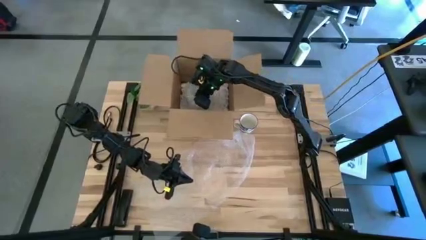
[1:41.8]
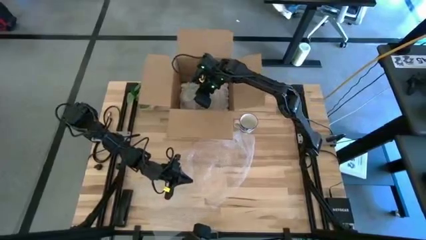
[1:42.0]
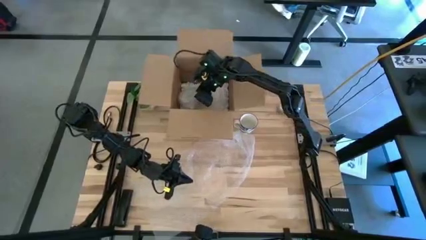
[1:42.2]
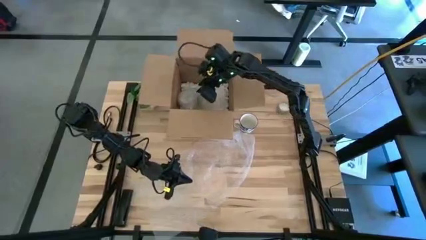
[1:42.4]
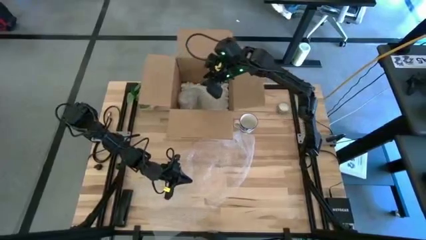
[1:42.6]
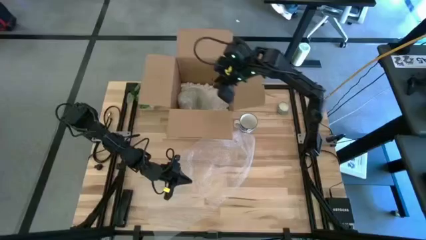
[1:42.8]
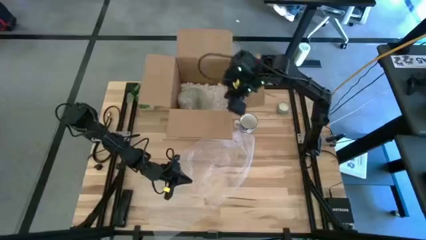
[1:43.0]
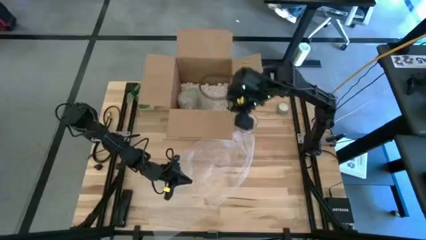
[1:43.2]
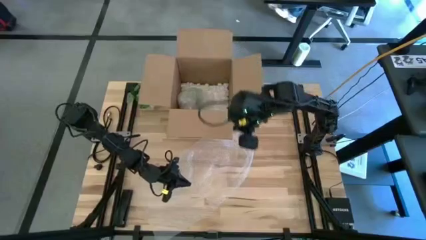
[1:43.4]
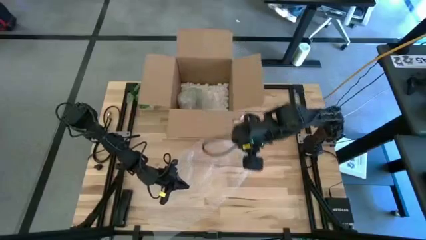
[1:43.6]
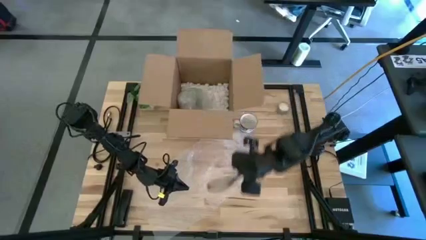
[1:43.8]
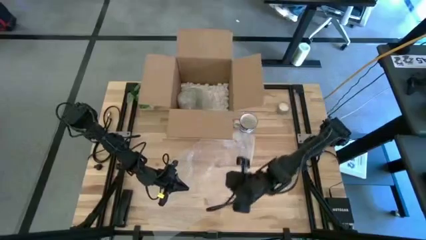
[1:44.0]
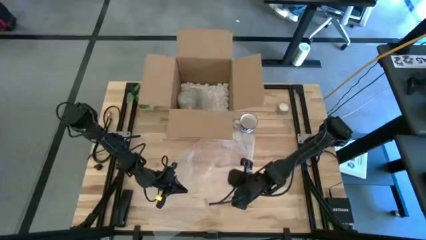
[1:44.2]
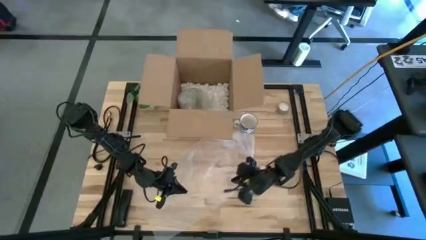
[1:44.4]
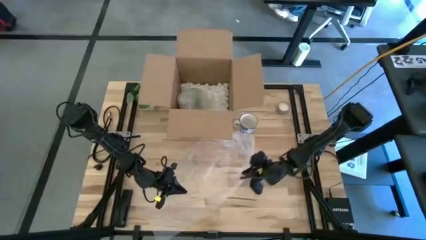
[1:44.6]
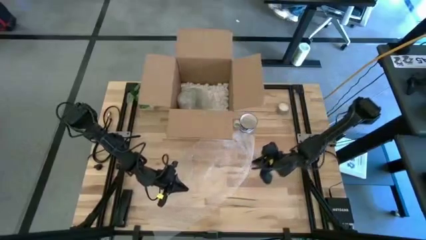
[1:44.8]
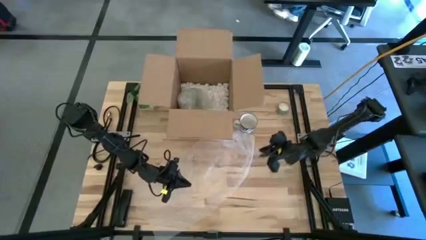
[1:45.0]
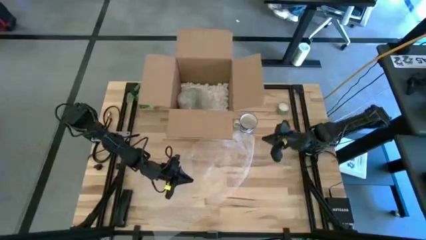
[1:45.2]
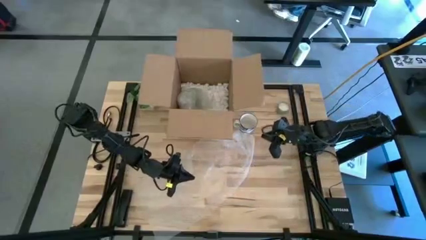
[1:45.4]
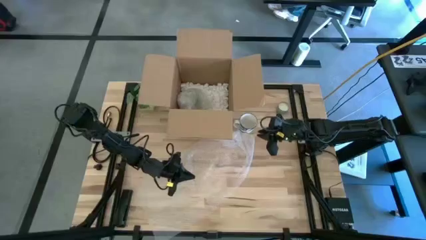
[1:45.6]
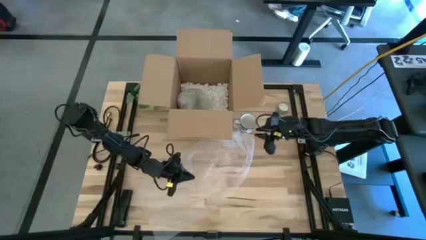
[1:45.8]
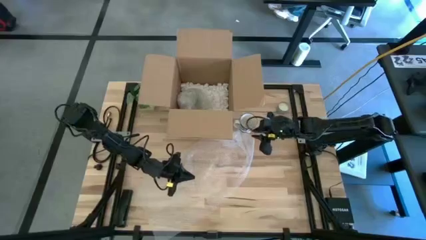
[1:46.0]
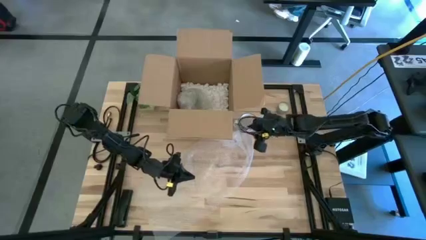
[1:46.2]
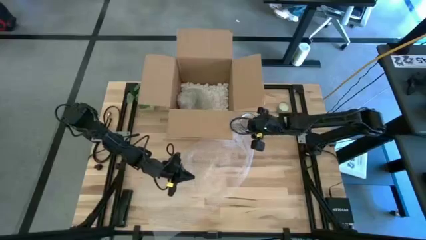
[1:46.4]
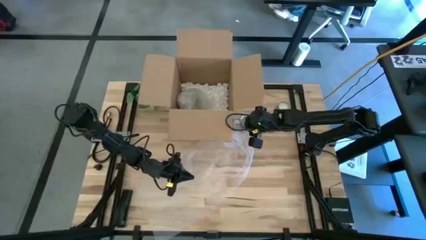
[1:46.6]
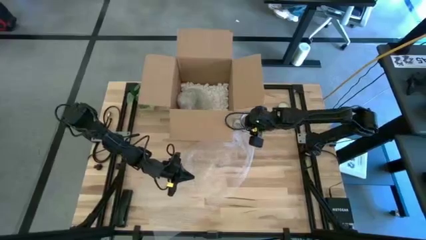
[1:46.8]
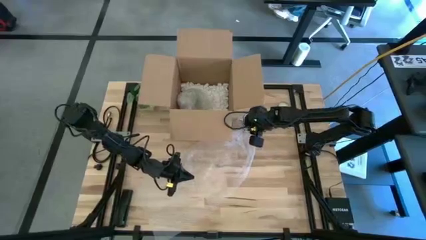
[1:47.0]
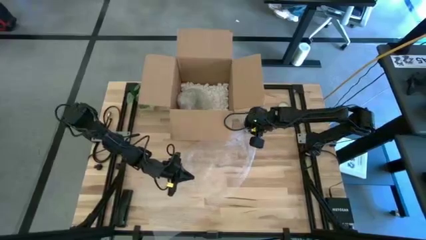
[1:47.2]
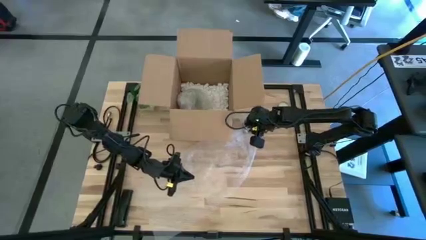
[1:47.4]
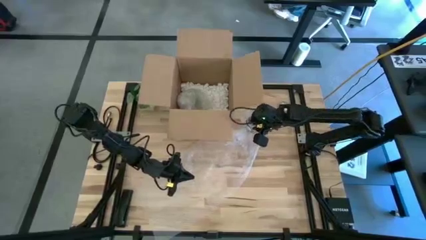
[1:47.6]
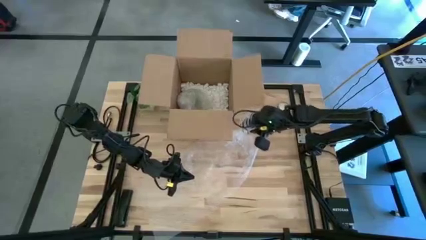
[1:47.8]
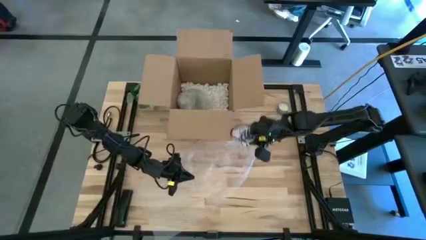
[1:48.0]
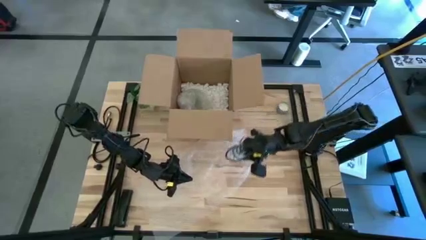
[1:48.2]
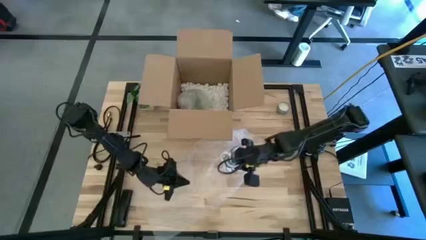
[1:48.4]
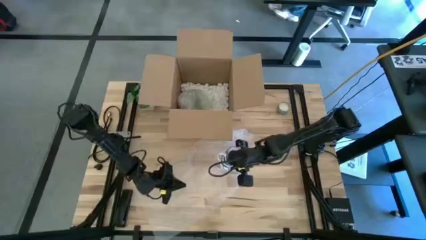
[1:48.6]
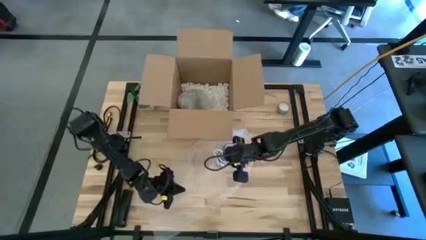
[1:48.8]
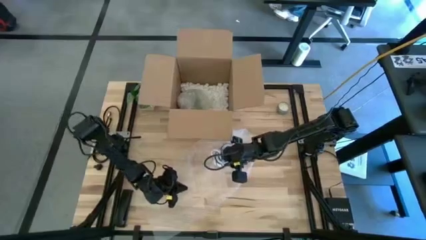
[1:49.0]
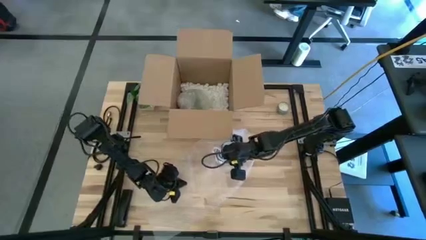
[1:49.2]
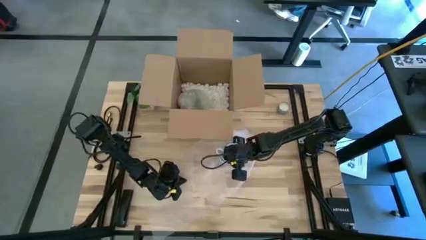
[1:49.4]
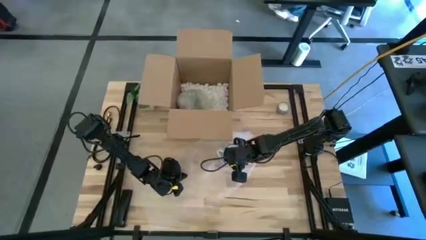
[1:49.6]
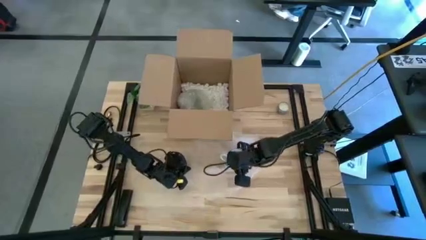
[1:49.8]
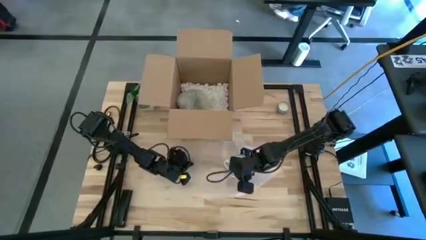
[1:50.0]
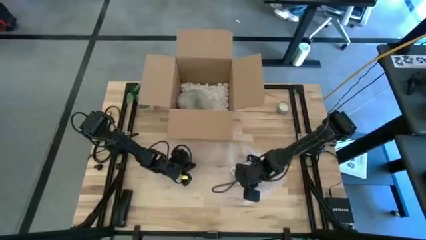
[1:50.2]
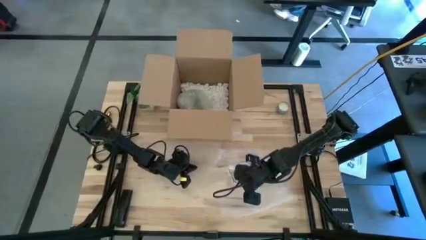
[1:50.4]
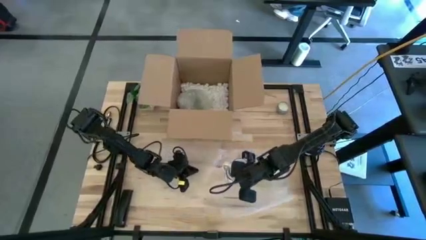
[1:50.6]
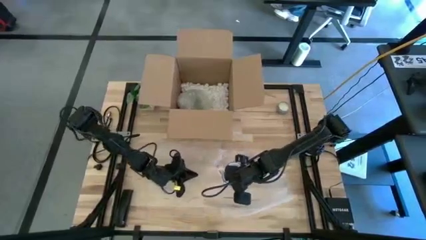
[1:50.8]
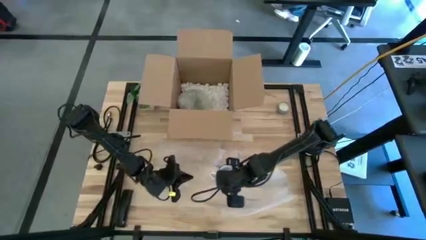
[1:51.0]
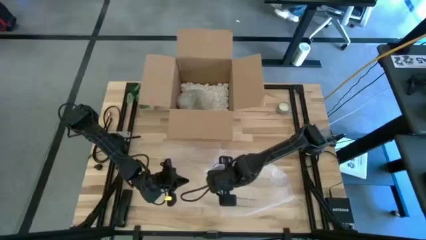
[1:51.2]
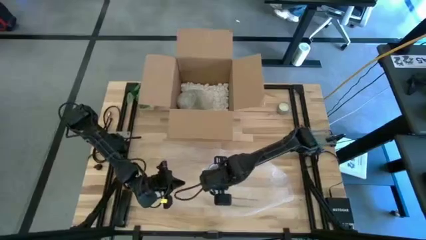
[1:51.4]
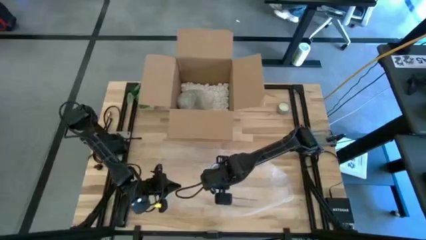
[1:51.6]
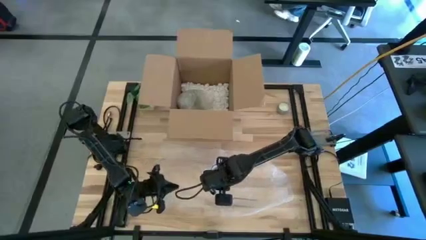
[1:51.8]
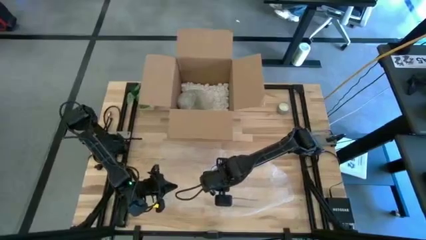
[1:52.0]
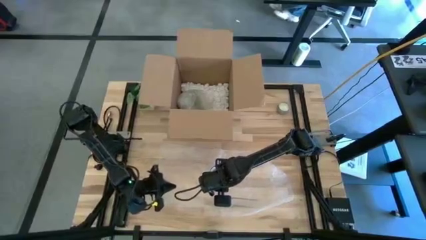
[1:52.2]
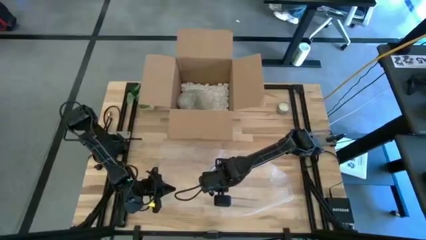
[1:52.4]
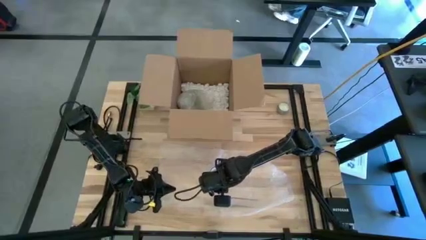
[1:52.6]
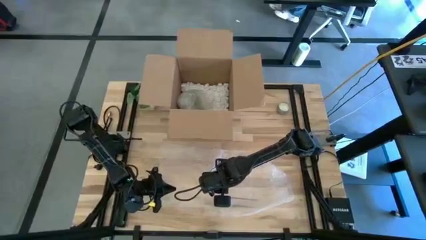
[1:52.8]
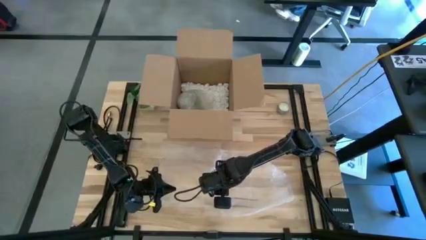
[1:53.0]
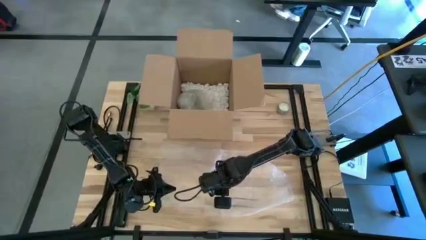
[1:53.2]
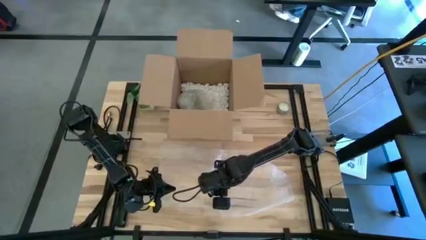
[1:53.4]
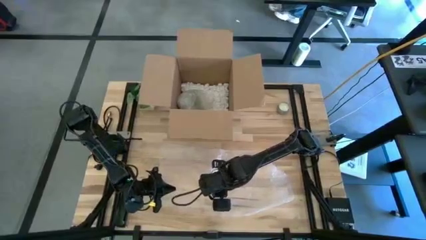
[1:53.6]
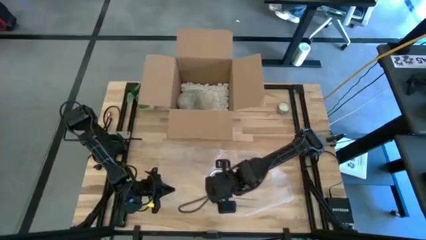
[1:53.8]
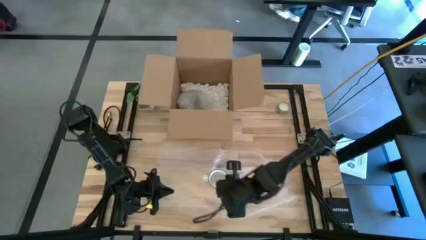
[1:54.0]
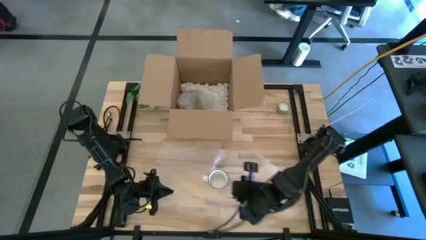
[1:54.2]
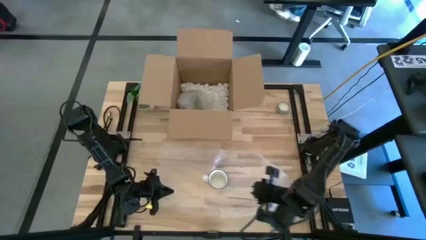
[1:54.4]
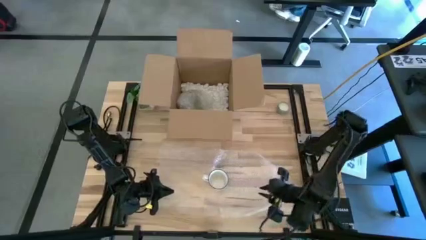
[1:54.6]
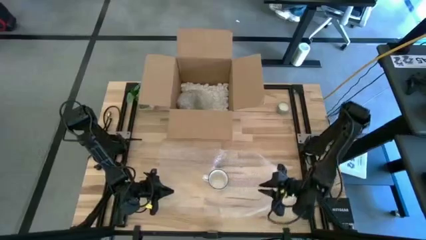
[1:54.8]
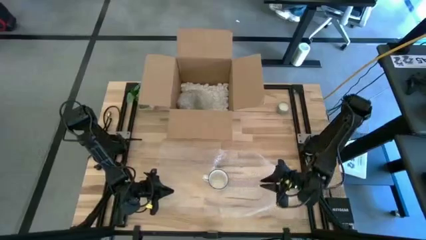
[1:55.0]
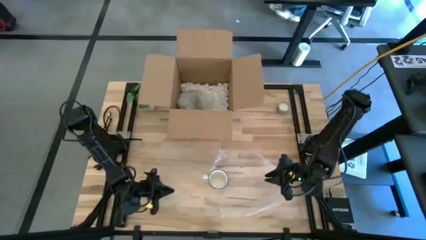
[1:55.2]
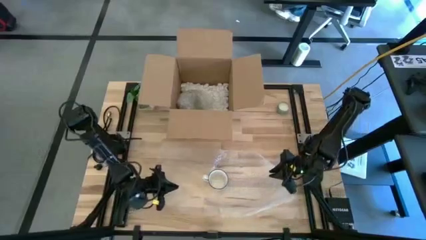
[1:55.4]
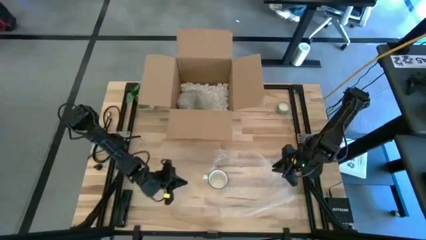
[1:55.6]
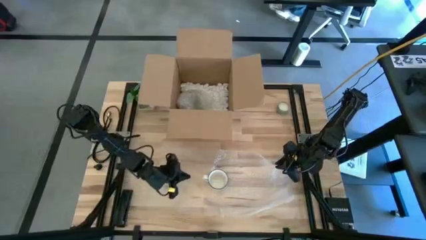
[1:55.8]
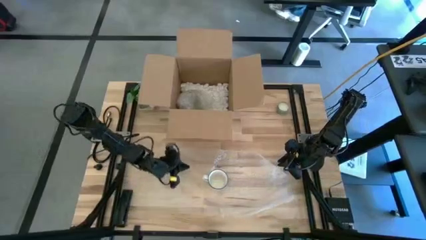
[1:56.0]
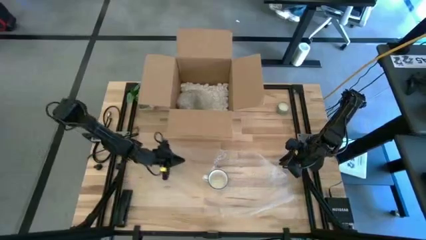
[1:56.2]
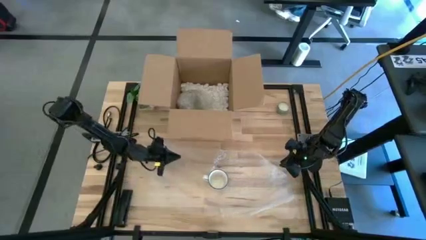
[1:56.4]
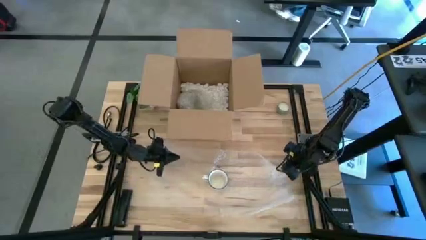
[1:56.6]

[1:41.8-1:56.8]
Task: wrap mug
Wrap the blue mug with the bubble wrap

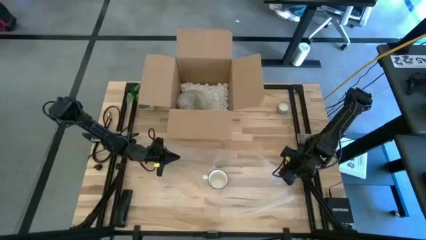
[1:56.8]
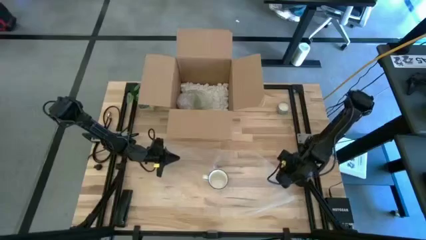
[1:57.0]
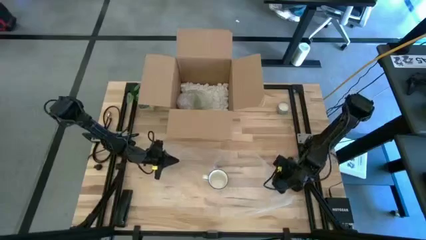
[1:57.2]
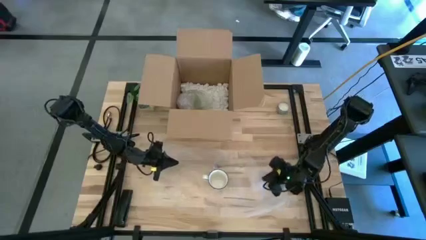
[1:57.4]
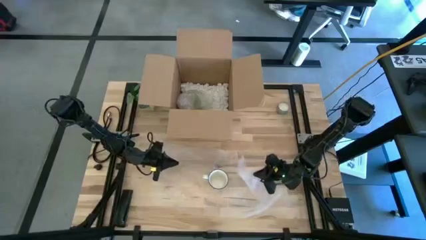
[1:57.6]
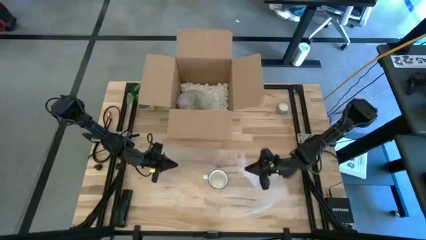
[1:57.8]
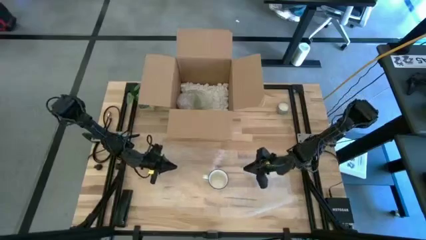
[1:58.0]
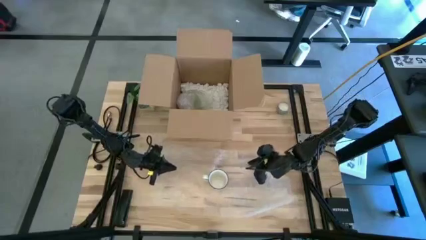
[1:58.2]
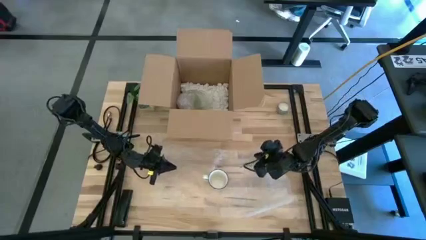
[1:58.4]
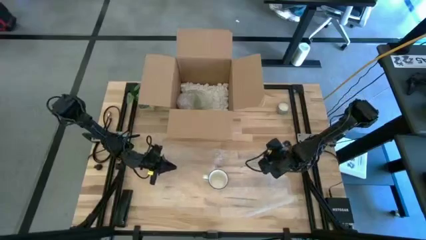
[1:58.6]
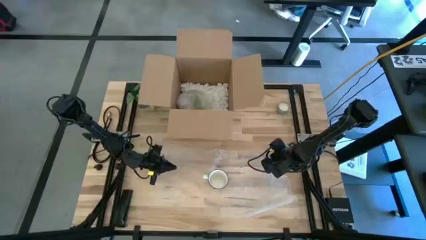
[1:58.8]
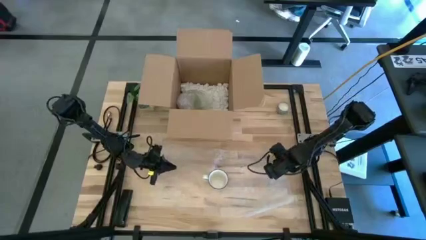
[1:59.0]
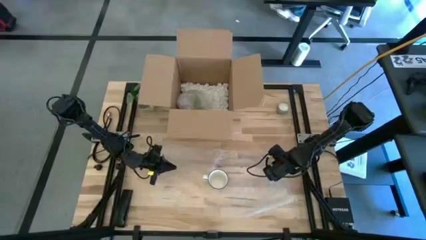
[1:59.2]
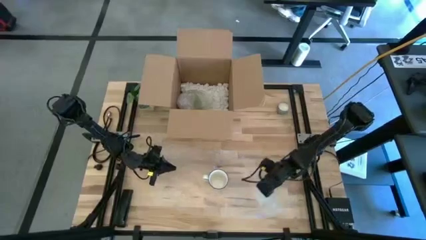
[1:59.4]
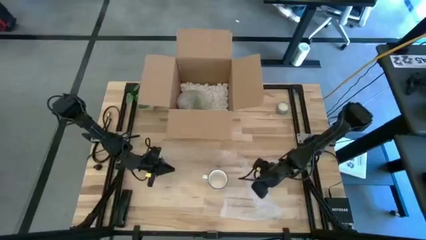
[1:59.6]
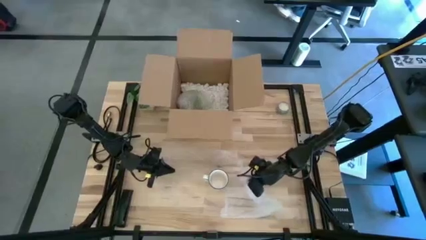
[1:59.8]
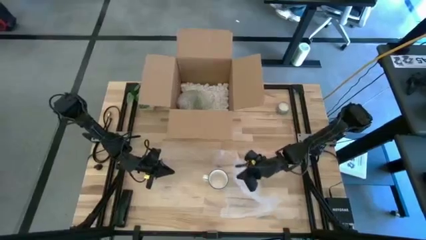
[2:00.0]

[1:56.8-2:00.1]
Wrap the blue mug with the bubble wrap
